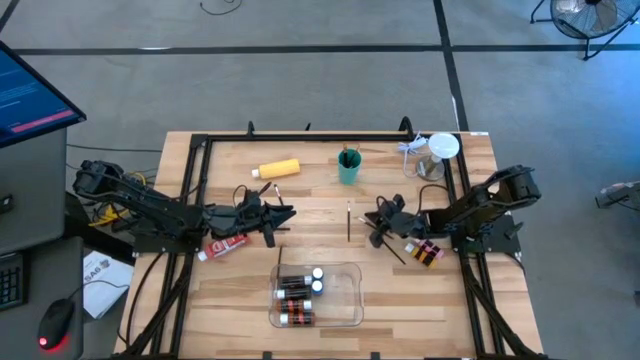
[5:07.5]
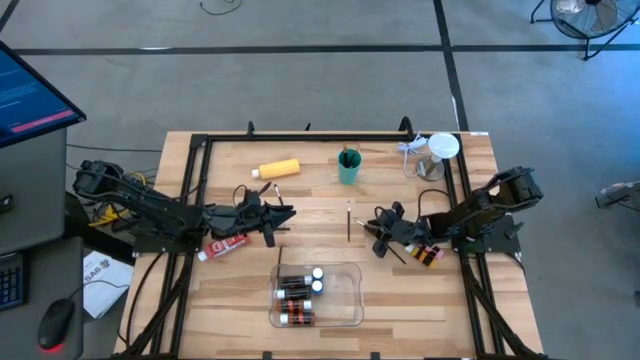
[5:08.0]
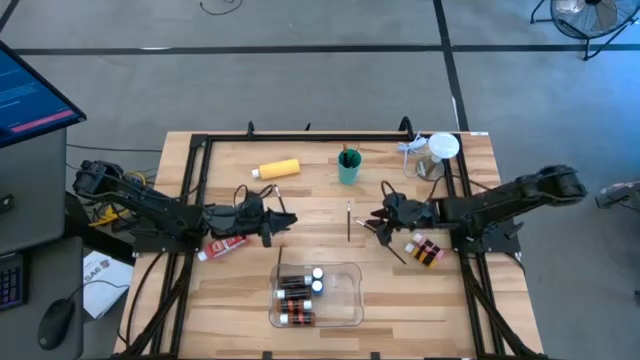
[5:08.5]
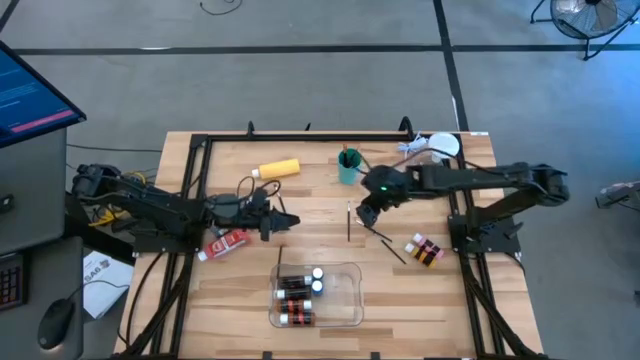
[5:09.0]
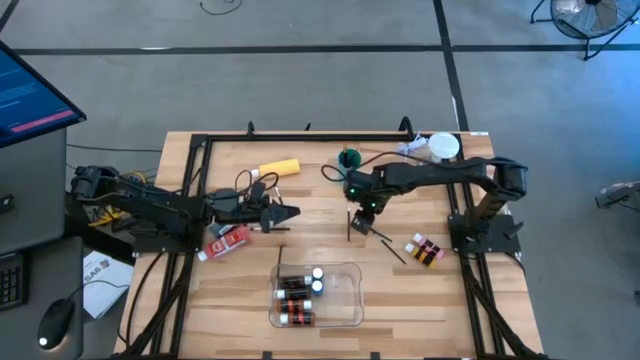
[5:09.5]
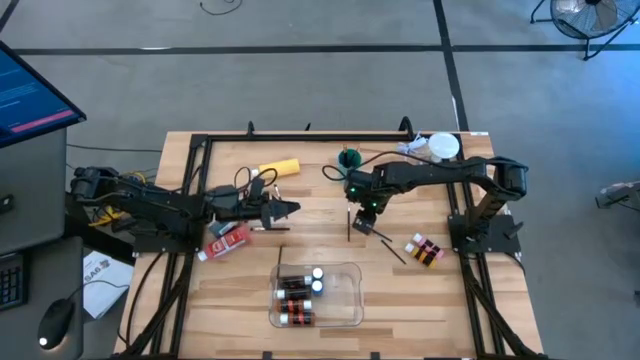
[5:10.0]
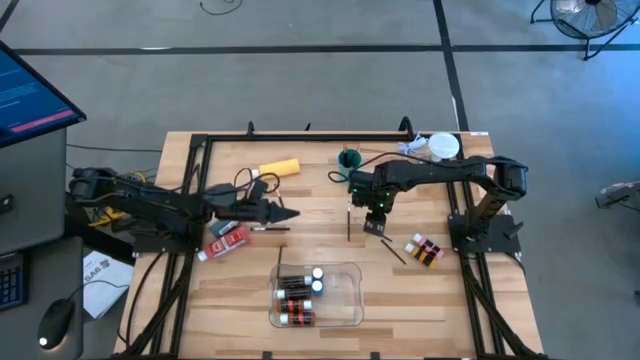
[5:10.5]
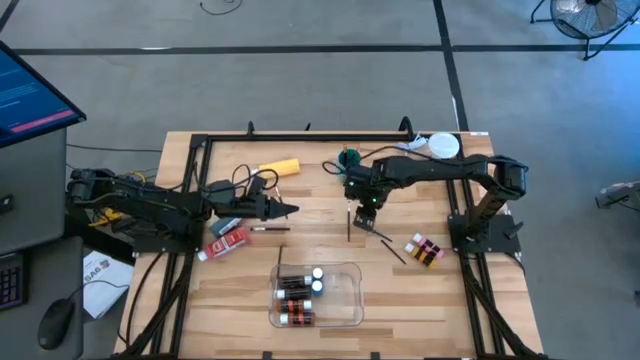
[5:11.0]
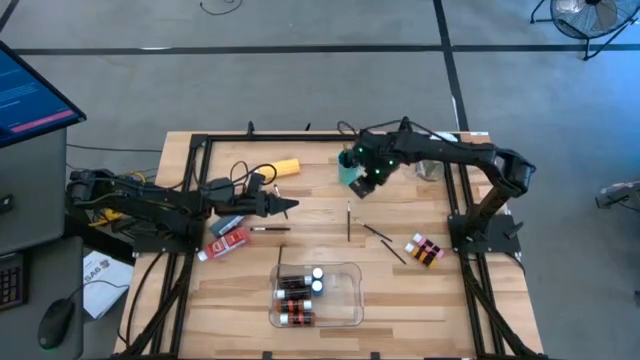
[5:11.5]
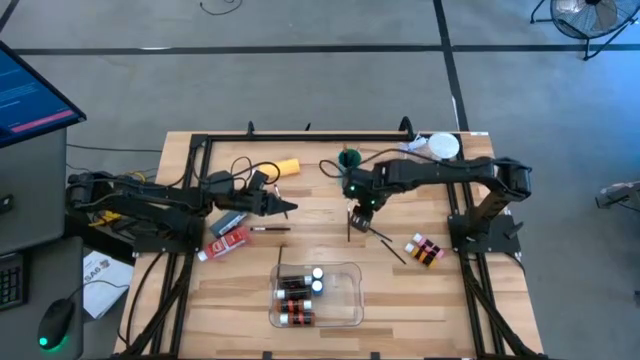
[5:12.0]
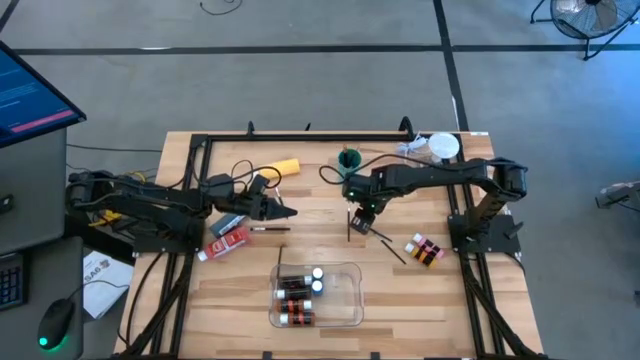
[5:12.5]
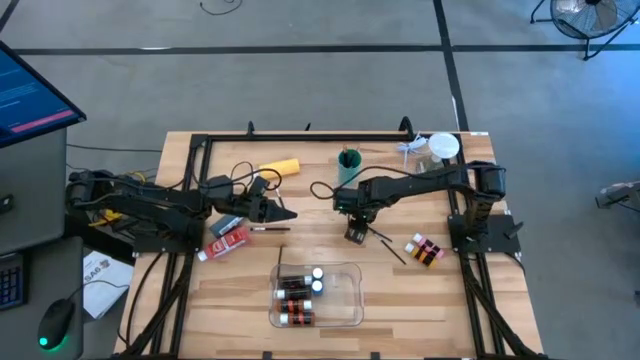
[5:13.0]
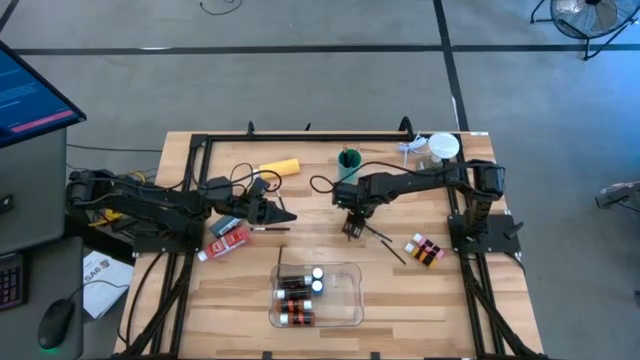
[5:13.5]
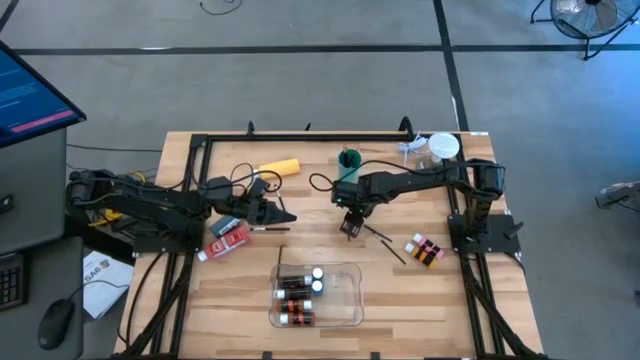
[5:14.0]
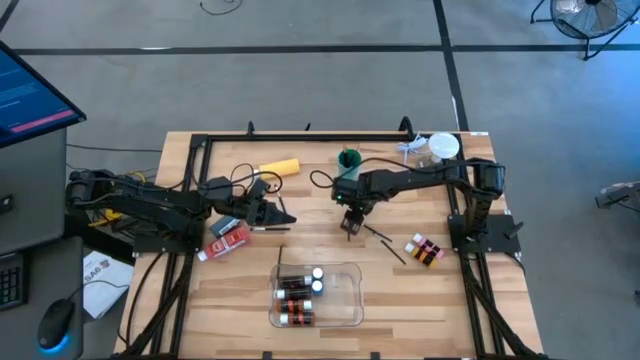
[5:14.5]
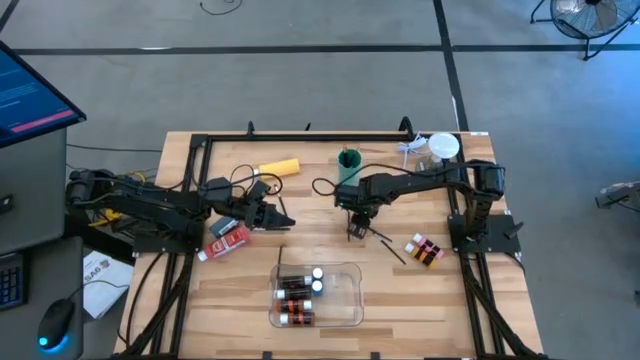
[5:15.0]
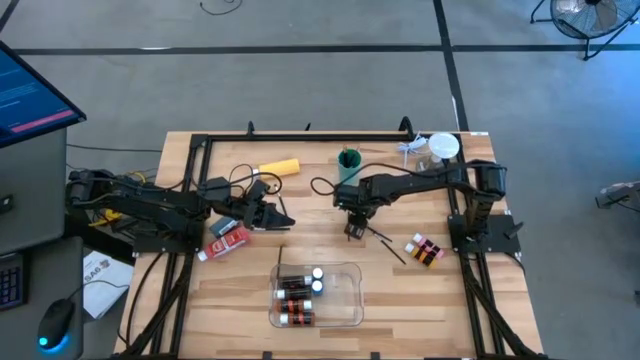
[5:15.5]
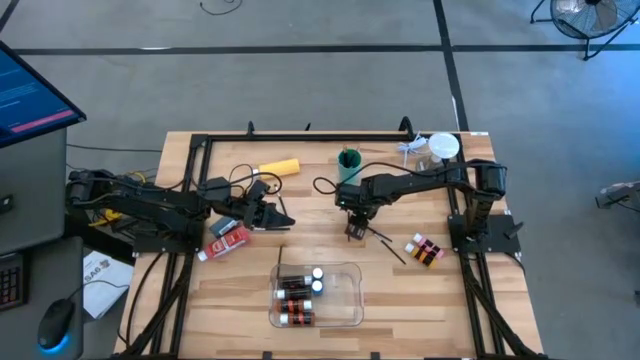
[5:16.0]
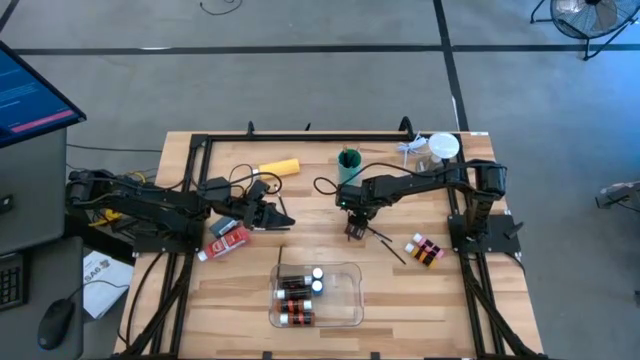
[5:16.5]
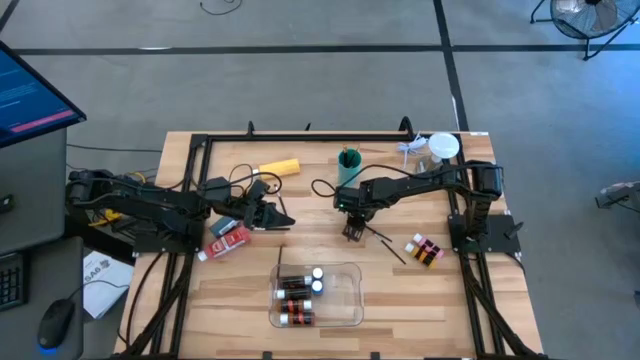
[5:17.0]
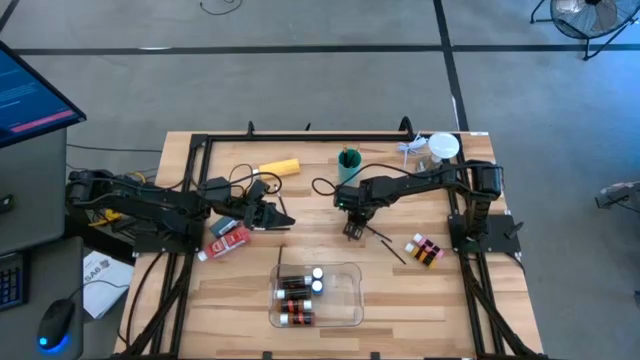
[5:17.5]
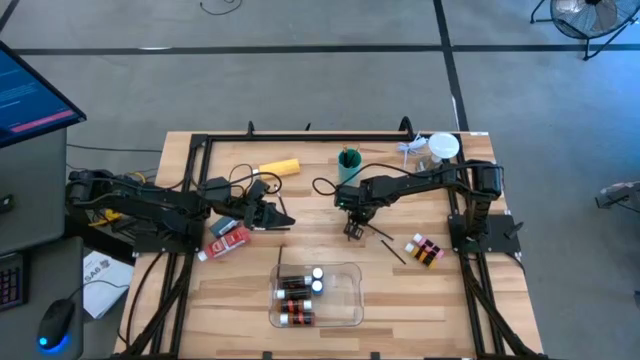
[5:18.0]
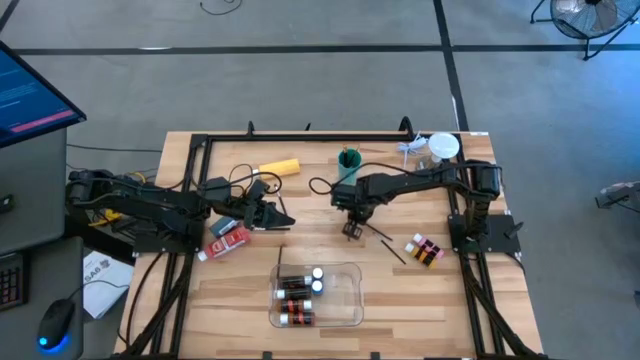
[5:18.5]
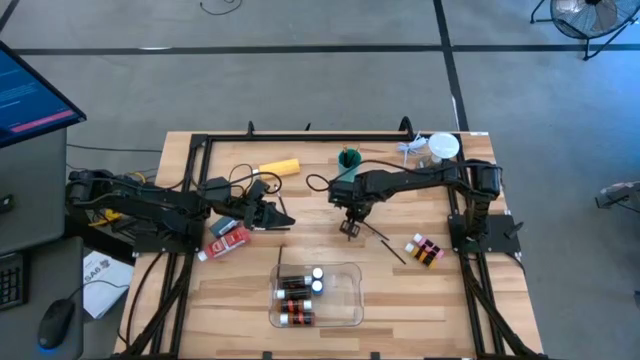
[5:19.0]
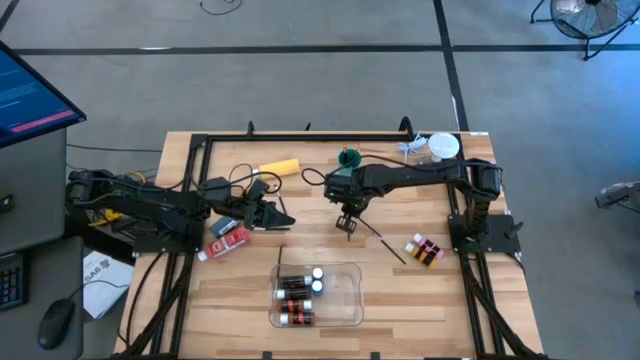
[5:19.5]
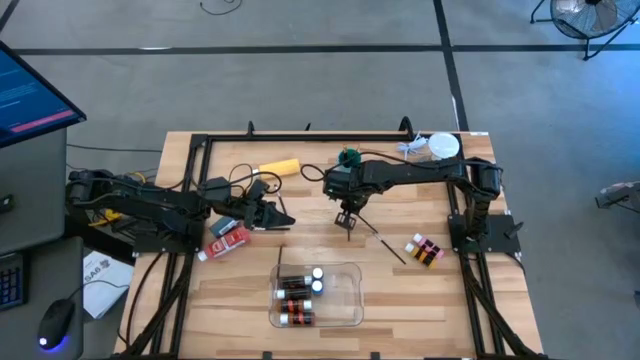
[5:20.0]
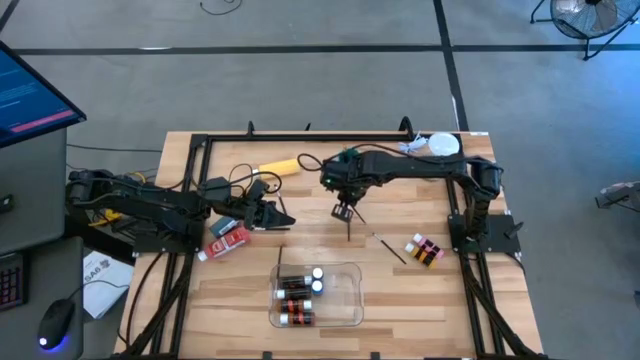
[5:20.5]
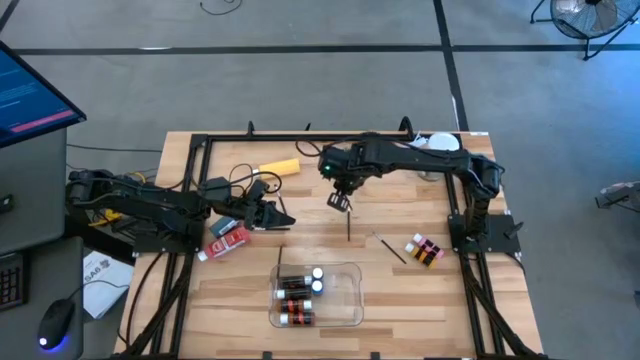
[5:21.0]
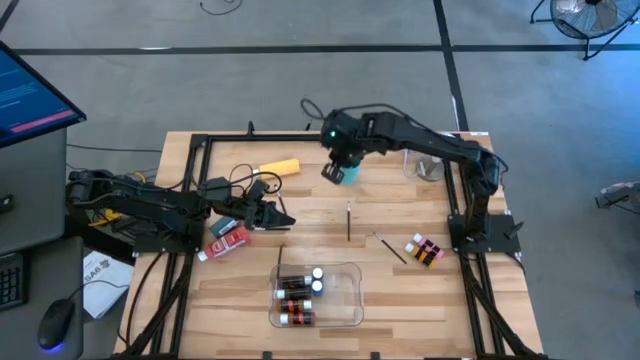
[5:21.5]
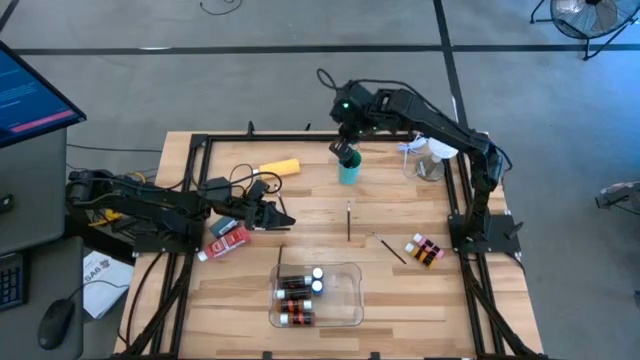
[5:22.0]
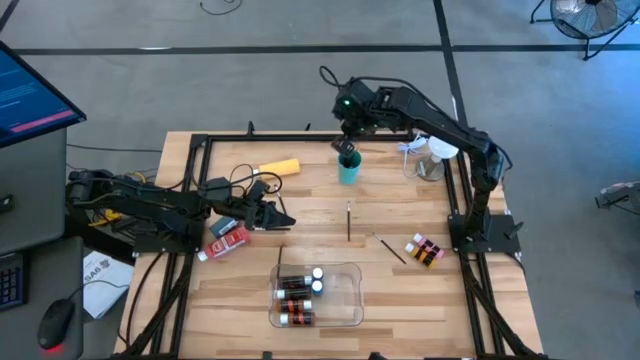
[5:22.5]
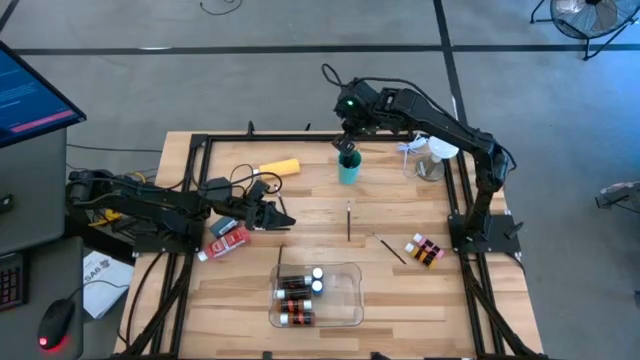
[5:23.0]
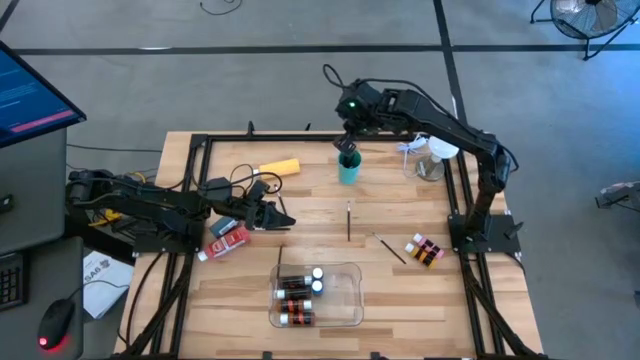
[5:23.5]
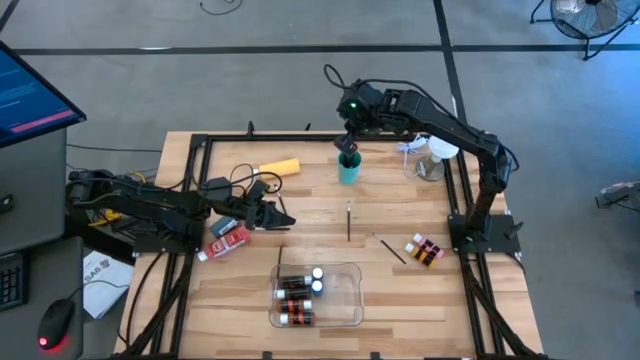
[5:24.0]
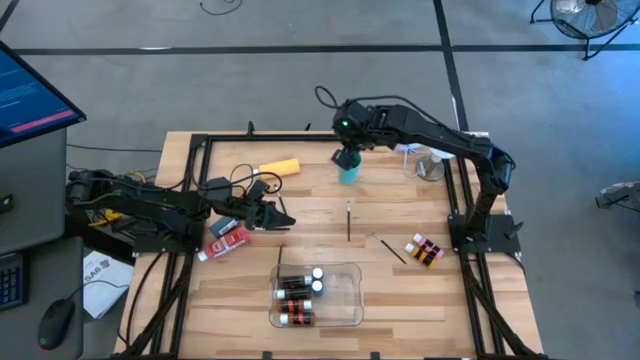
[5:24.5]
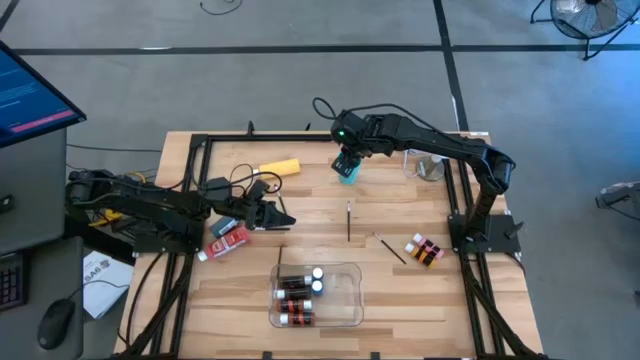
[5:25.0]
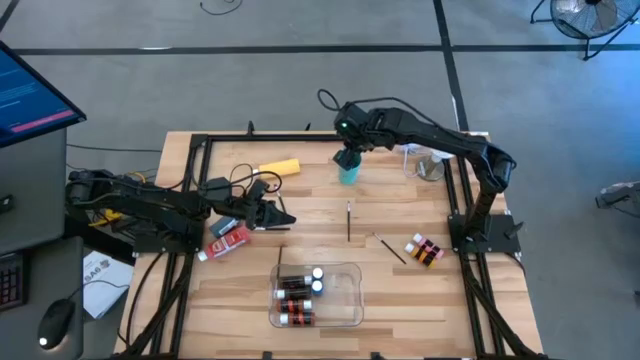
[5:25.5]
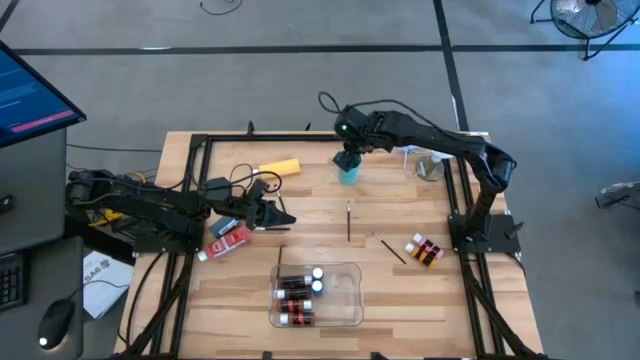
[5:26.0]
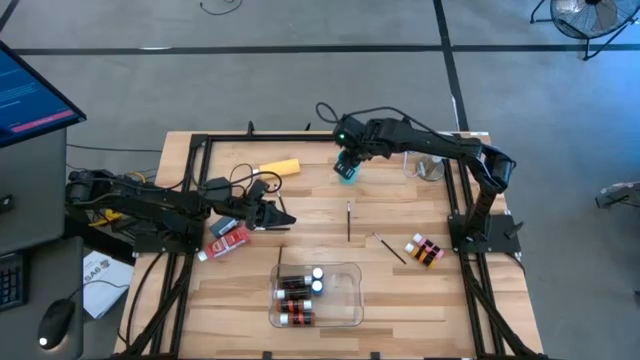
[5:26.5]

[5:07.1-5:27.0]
Task: Pick & Place Paint Supplies
Put the silver paint brush into the green cup

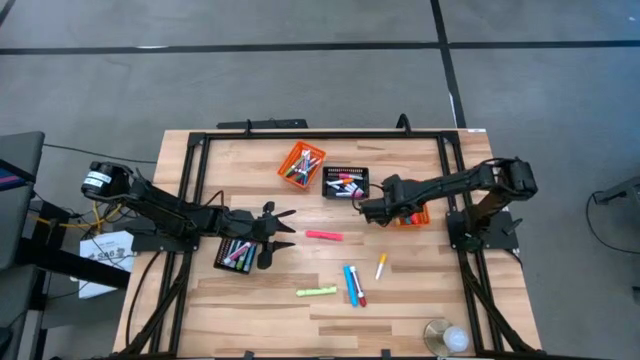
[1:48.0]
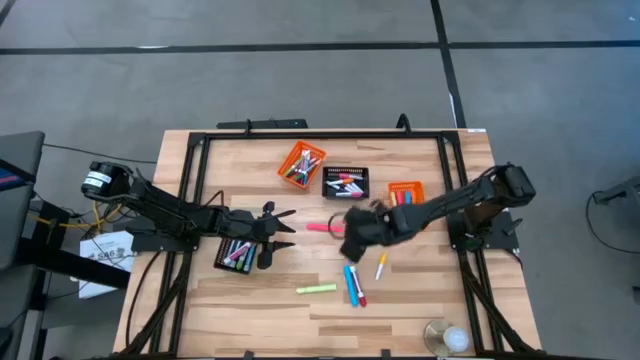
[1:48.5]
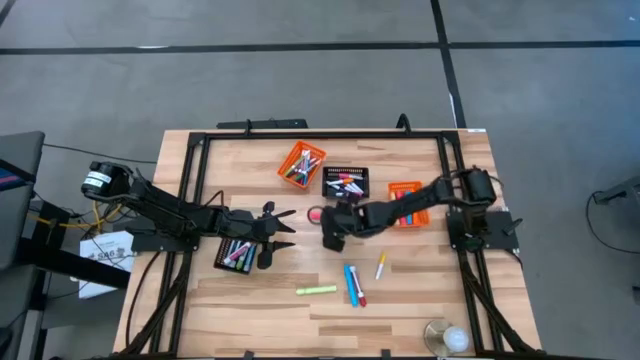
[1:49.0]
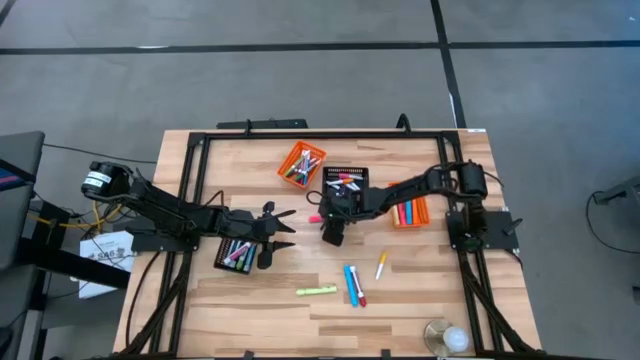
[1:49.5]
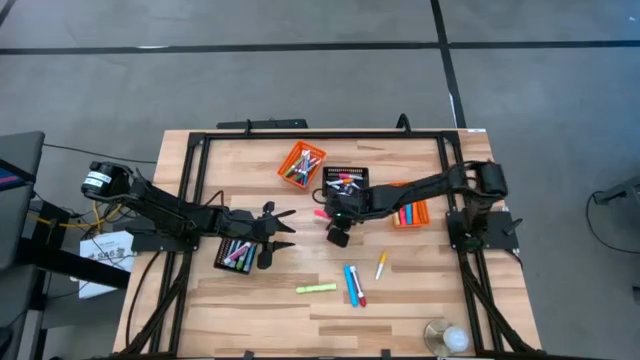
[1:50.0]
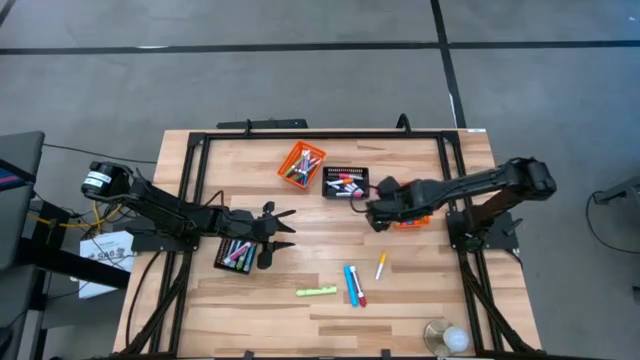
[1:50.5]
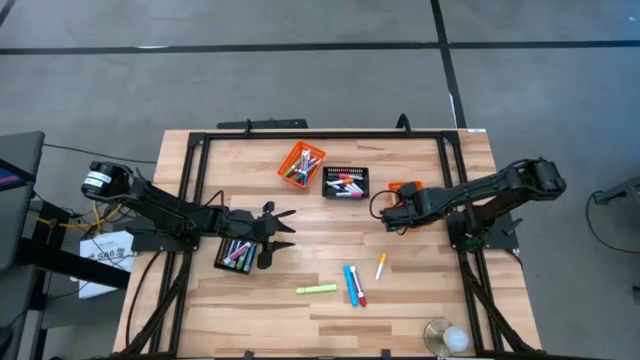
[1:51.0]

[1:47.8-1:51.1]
Task: Pick & Place Markers
Put the pink highlighter into the right orange bin
